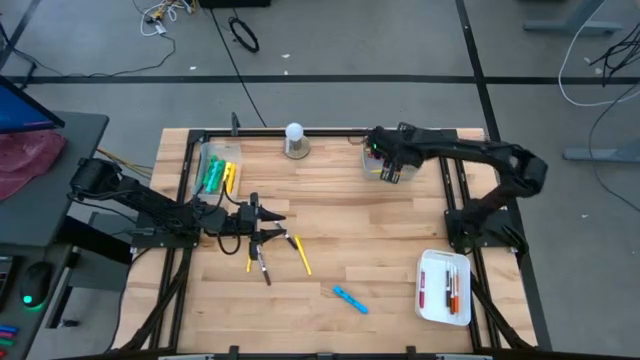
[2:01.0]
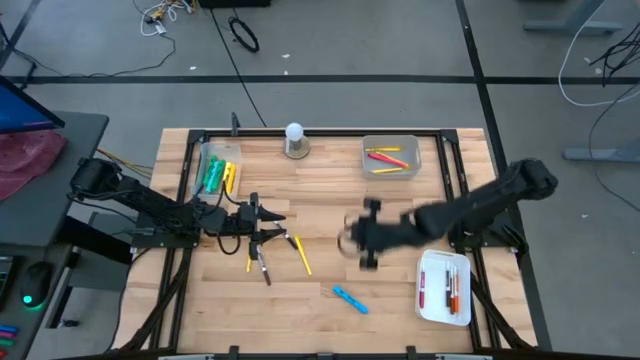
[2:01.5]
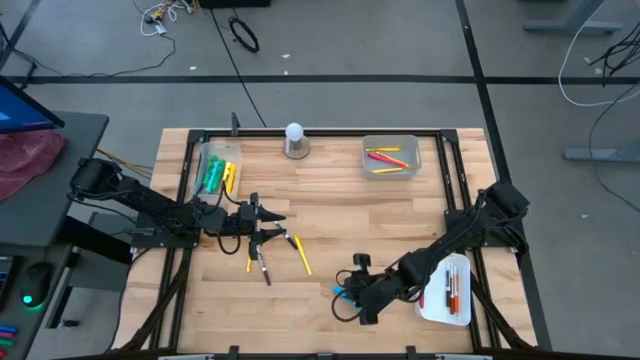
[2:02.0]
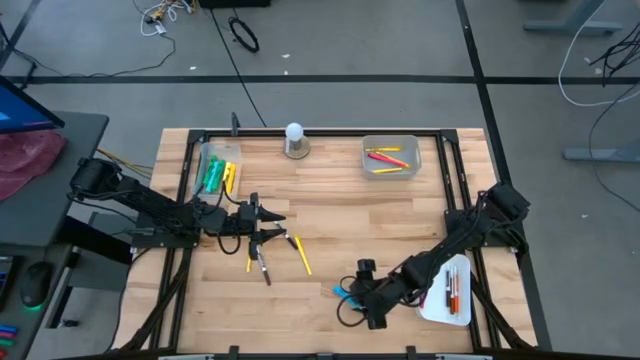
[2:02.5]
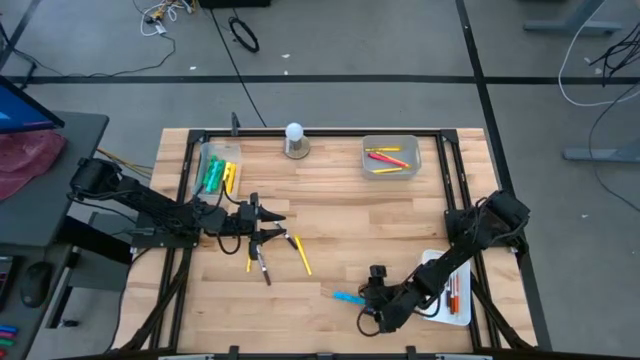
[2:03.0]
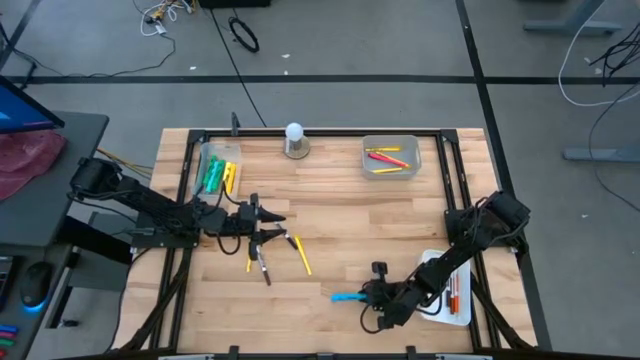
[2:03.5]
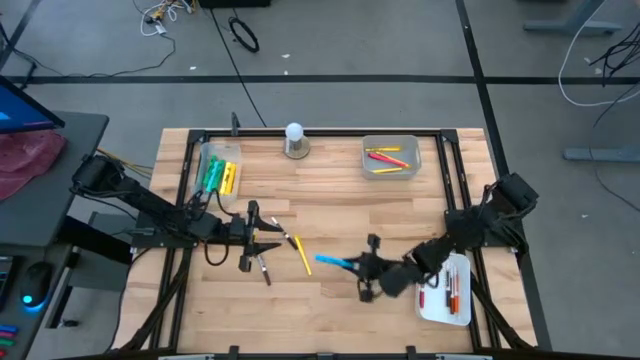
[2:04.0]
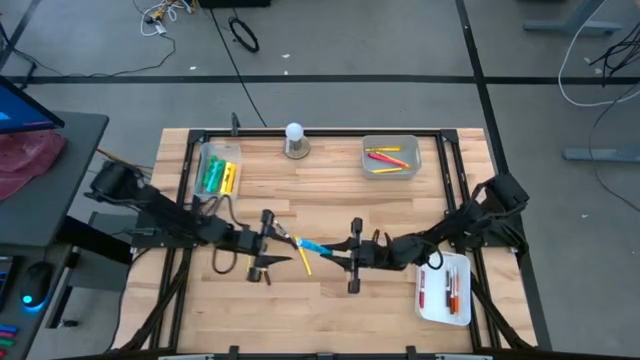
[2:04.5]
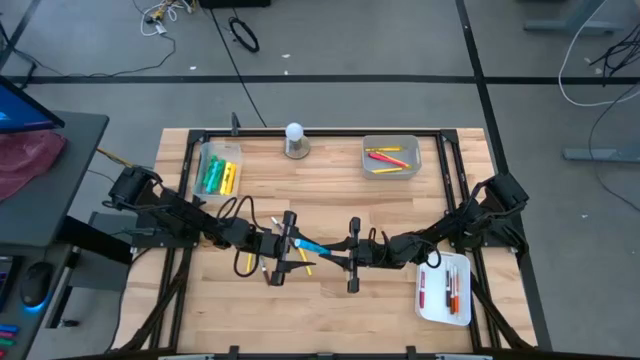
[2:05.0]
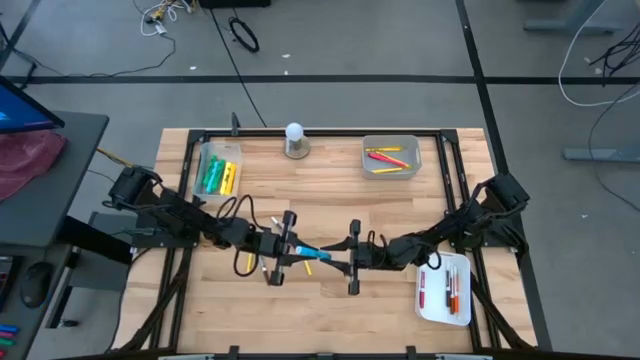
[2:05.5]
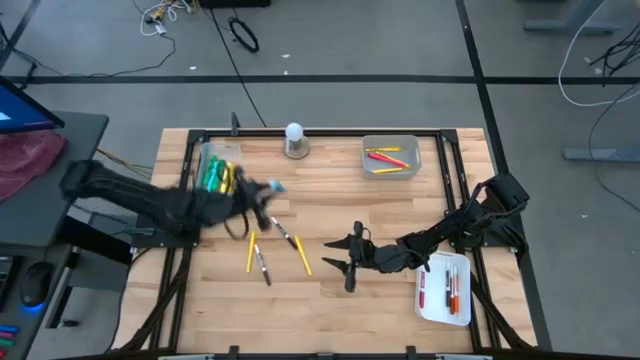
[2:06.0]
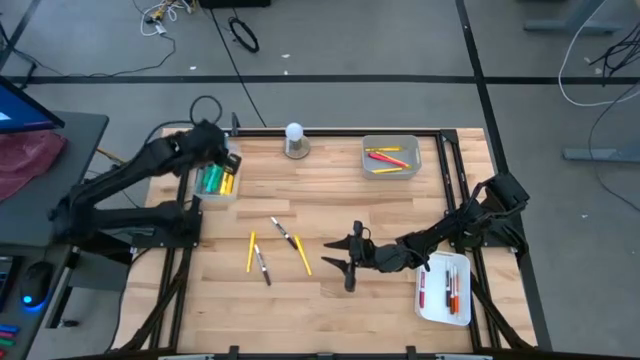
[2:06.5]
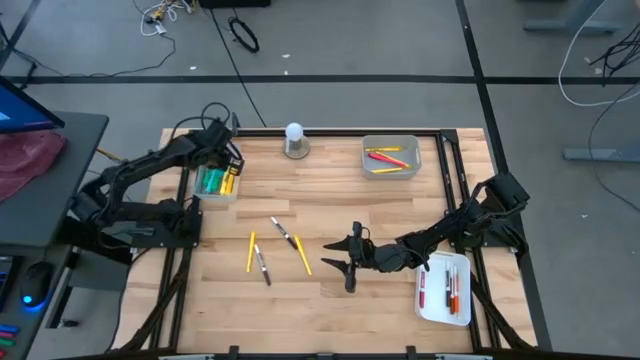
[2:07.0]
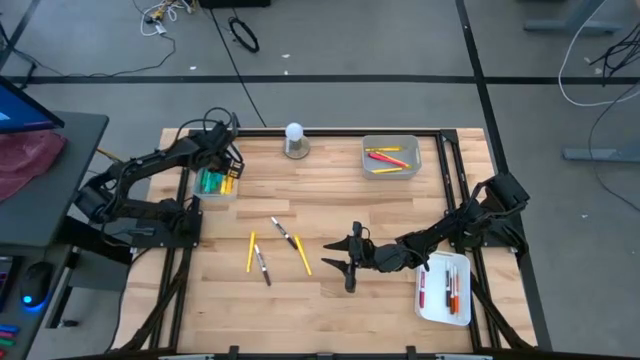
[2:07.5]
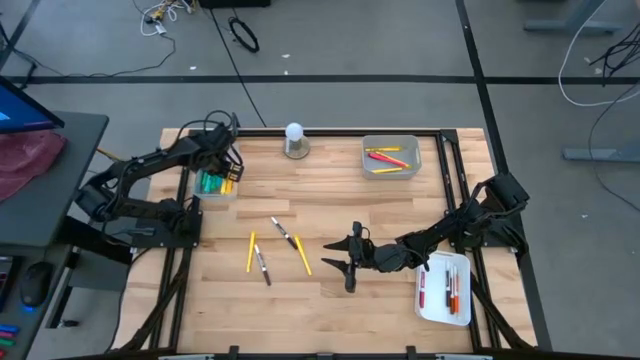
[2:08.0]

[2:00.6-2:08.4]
Task: Pick & Place Markers
Put the blue highlighter into the transparent bin

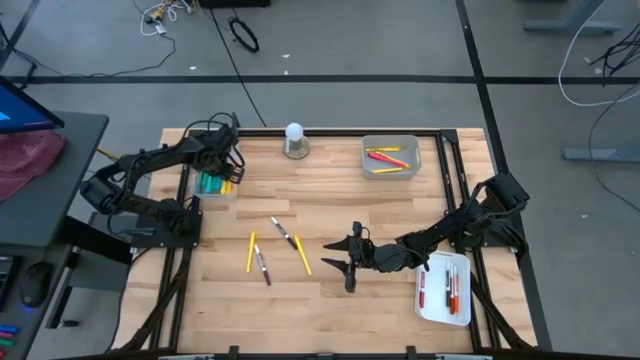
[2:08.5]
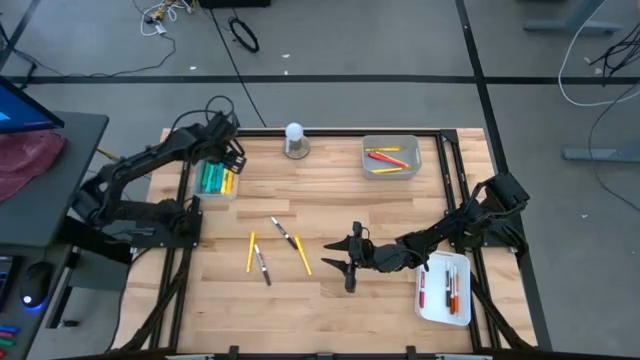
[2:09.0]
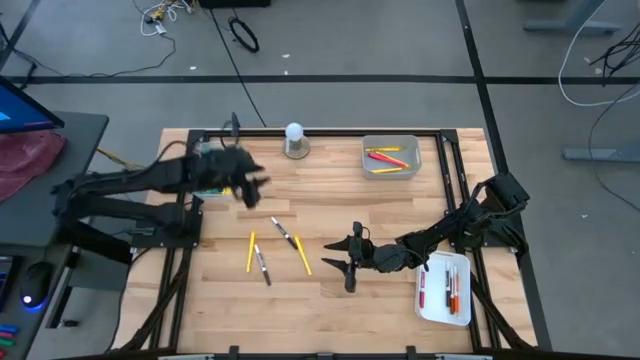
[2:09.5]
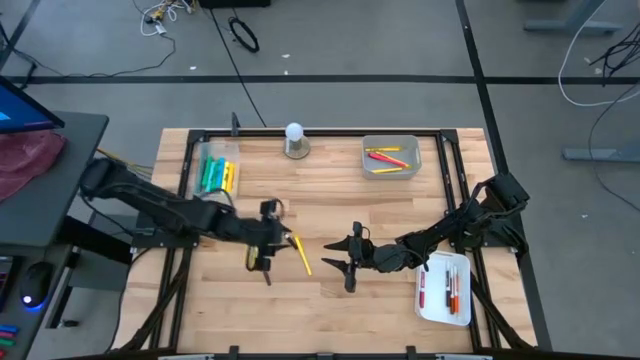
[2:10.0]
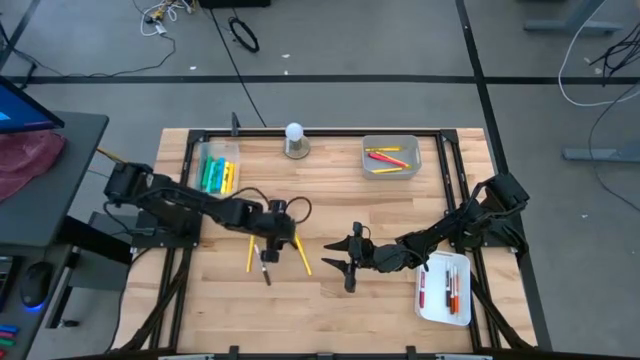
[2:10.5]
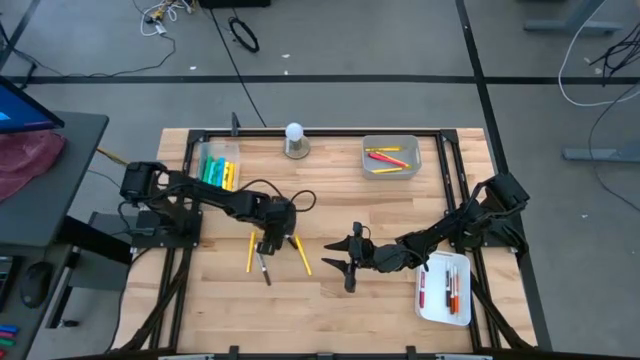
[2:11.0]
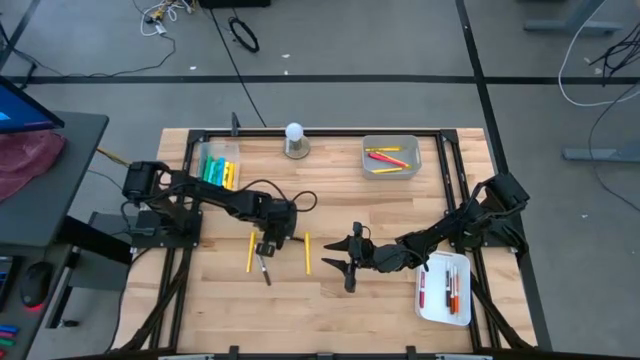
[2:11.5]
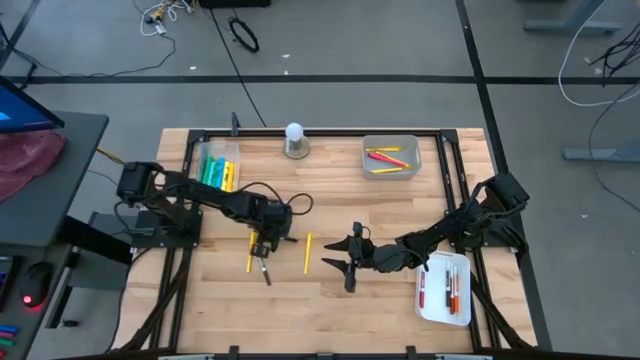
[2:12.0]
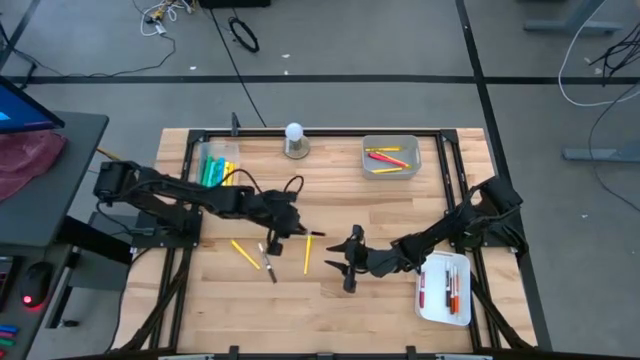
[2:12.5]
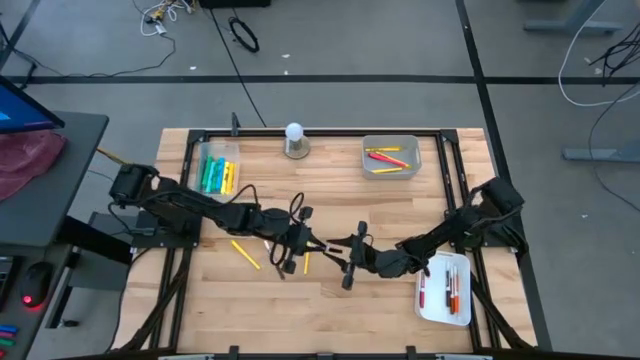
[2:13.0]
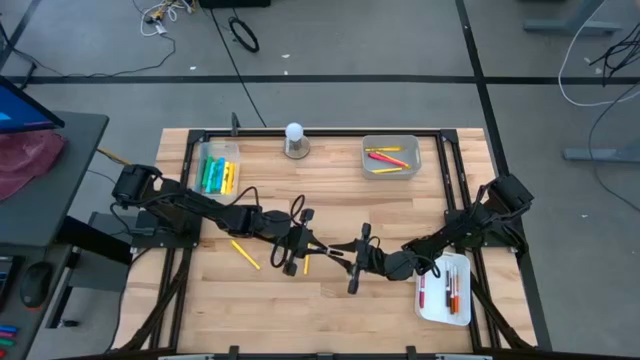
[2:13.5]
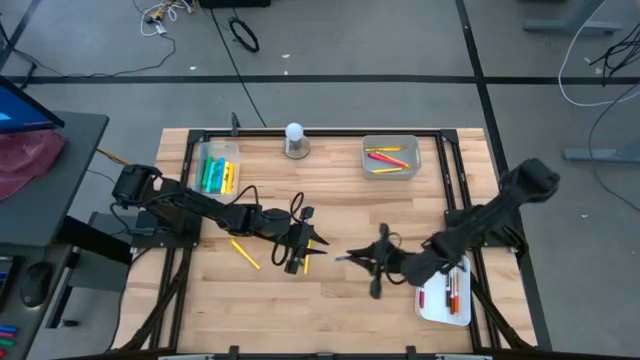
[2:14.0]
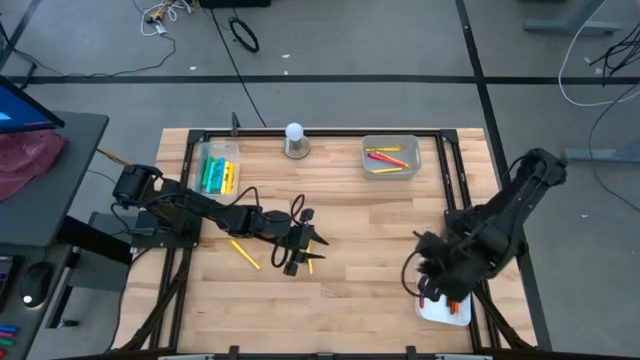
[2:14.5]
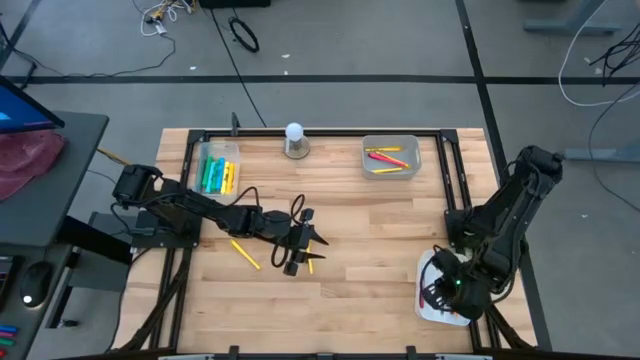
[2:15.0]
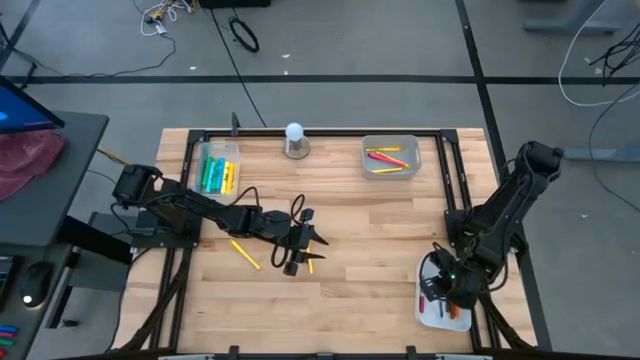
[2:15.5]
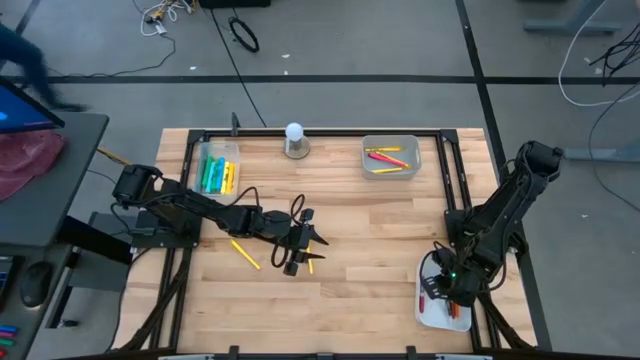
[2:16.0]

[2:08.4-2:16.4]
Put the black marker into the white bin

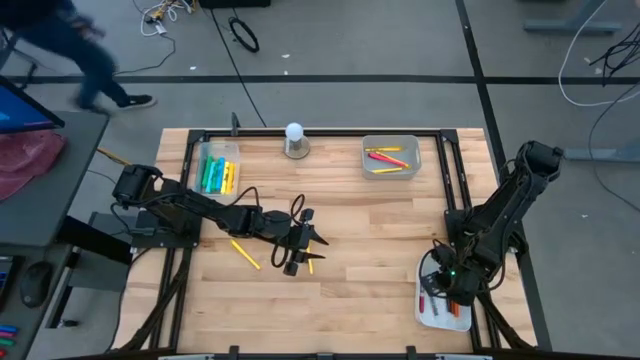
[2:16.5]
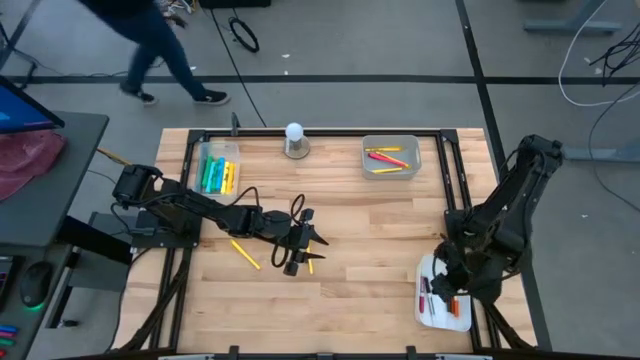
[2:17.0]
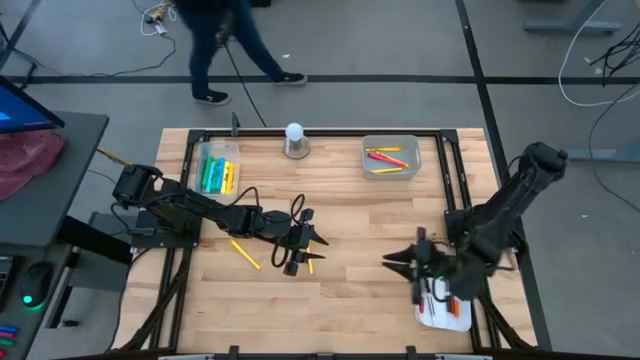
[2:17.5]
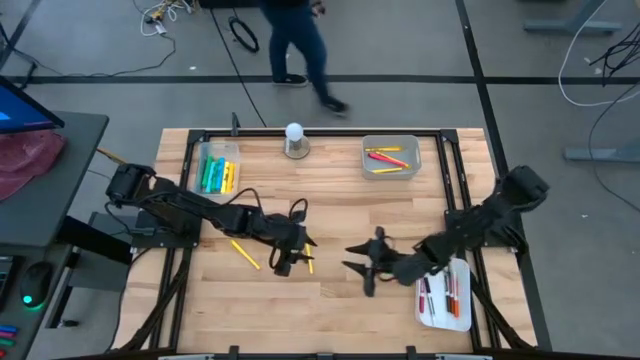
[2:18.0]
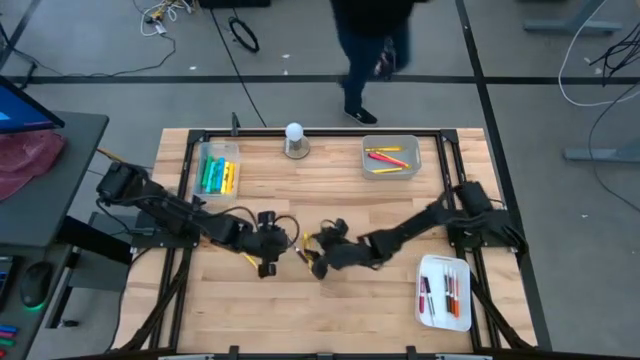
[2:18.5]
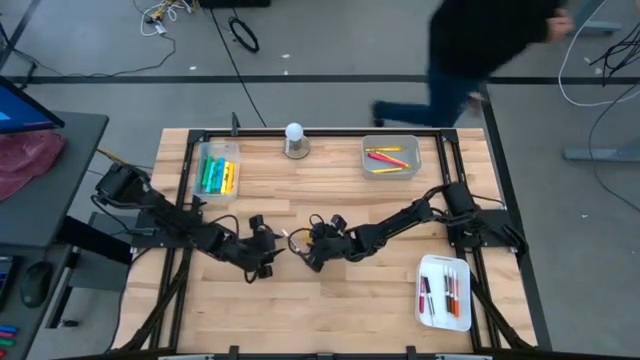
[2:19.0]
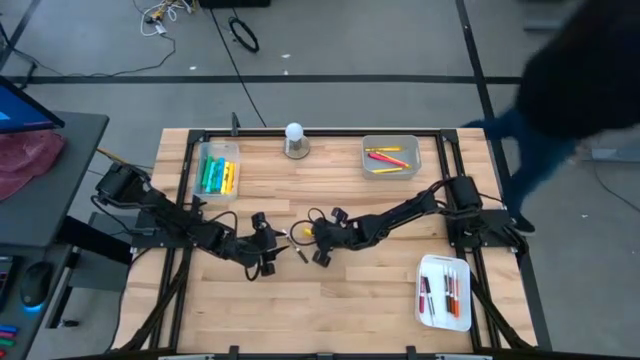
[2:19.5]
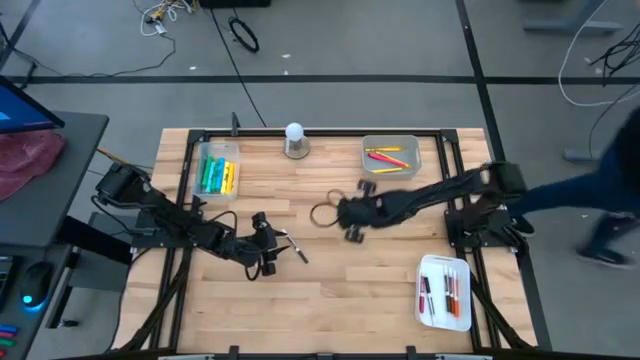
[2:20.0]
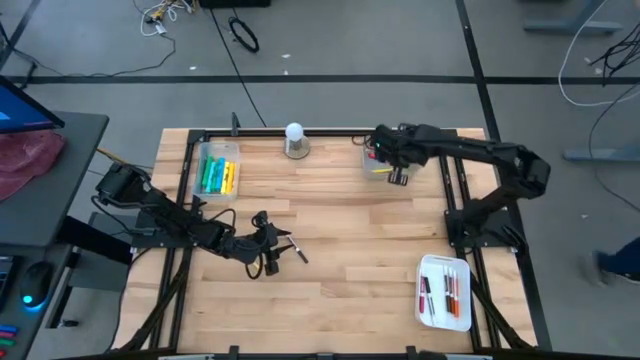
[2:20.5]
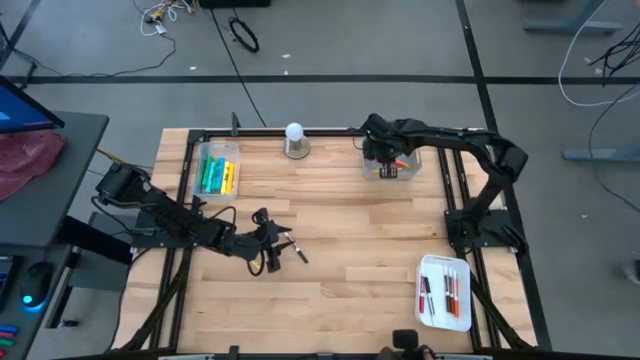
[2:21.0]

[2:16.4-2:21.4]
Put the yellow pen into the gray bin
